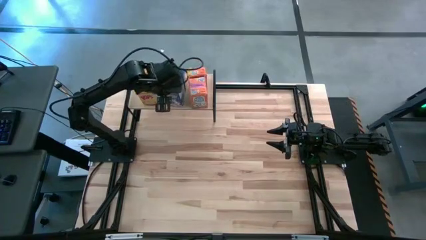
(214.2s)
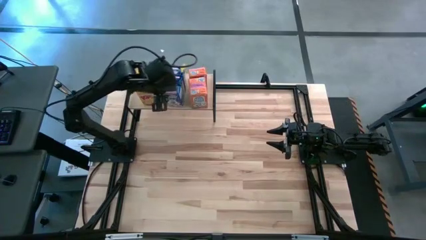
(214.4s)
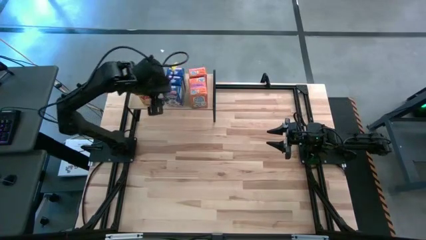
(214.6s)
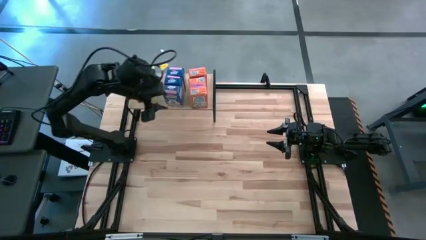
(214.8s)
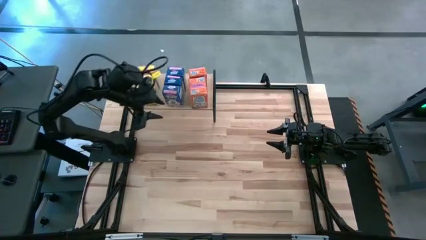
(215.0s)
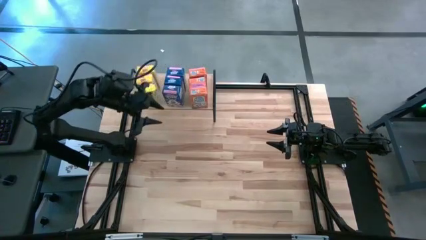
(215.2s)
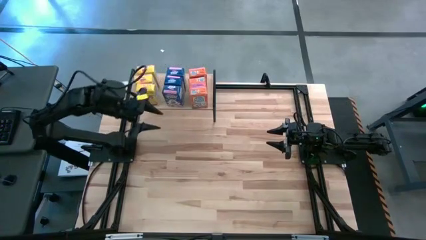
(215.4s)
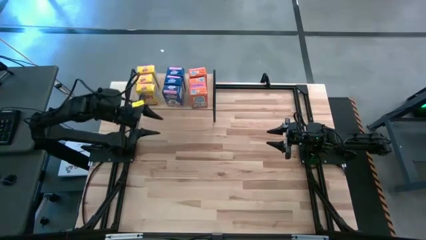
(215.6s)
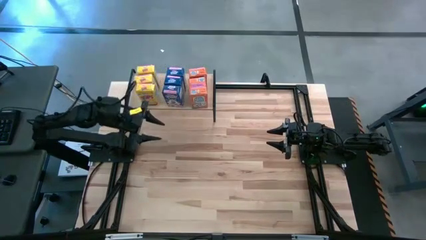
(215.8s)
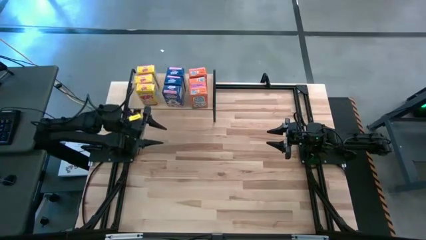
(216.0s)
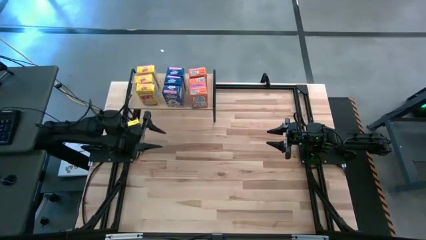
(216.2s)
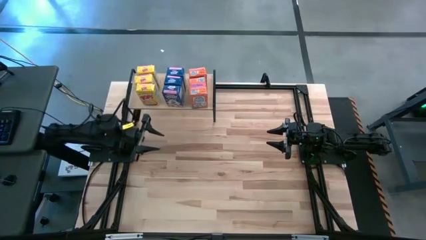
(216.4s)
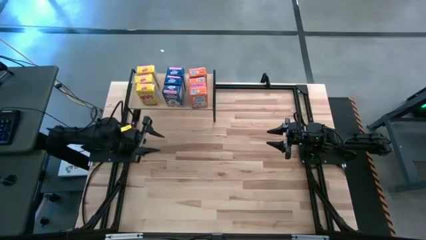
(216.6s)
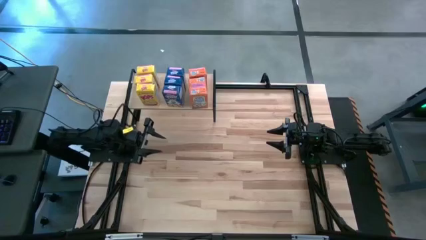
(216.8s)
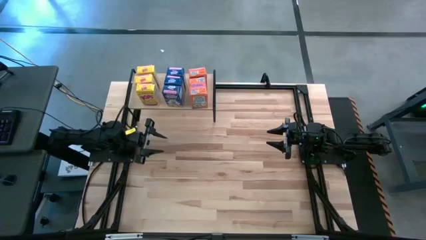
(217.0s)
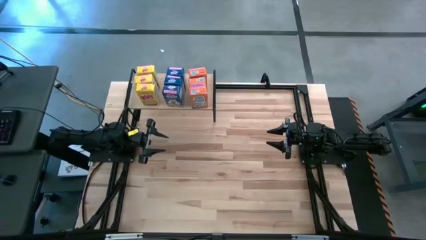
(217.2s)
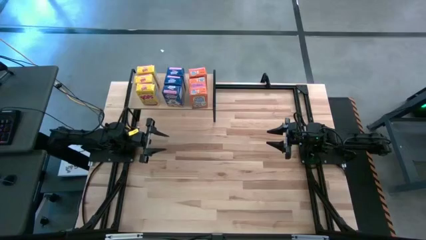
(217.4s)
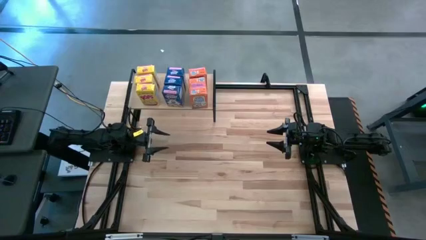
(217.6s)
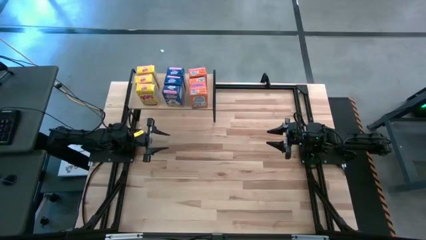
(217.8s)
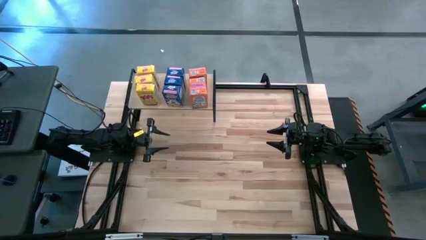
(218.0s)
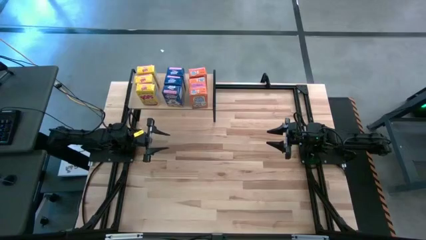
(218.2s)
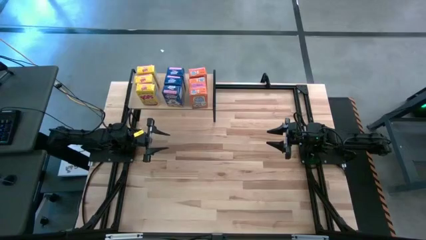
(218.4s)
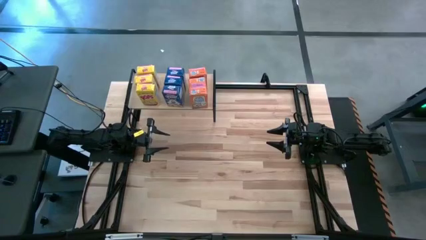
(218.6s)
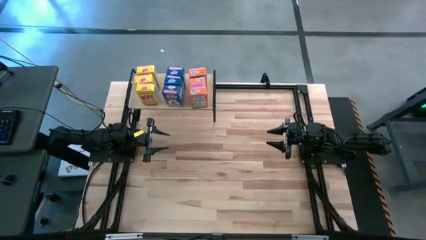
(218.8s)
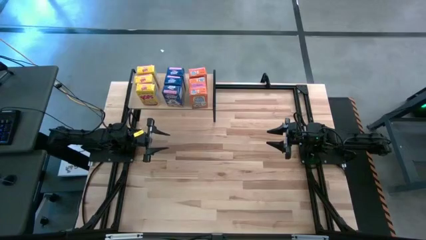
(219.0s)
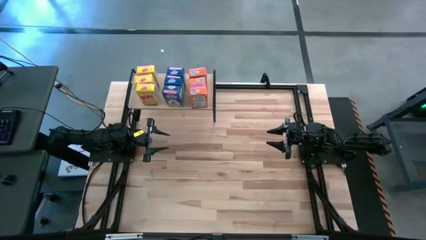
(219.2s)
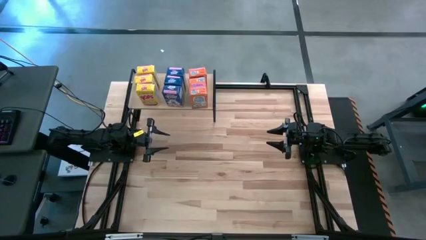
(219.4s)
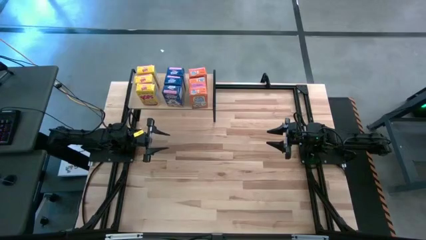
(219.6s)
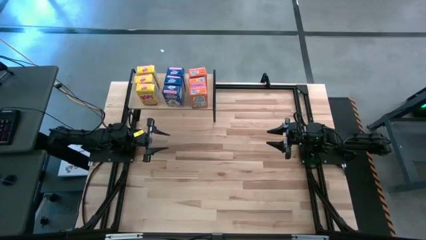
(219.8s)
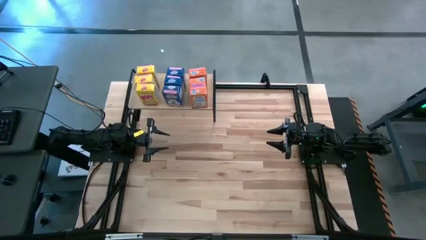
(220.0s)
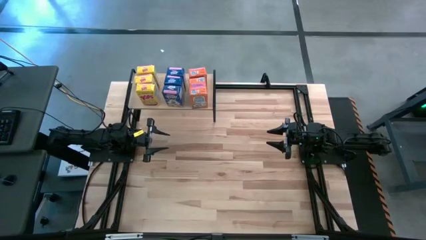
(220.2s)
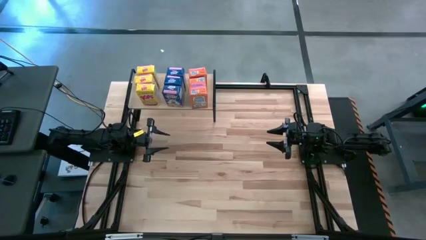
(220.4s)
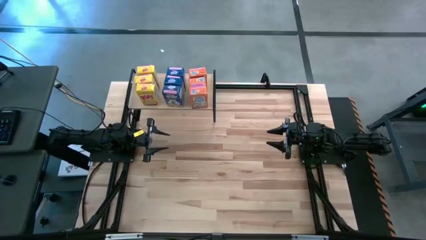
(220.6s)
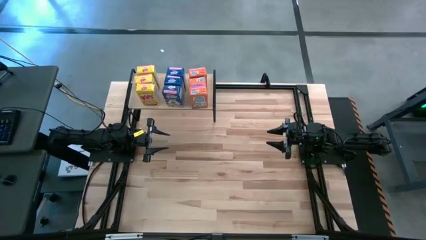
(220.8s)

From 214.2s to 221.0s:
Task: Stack cereal on shelf
Return to Home Position

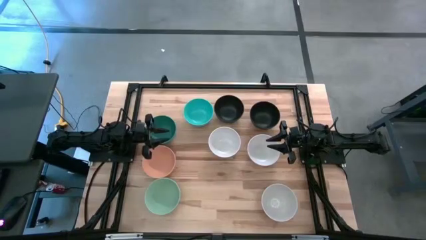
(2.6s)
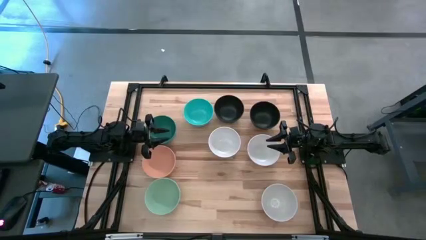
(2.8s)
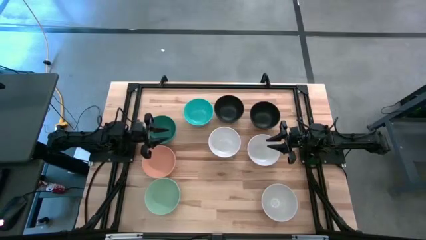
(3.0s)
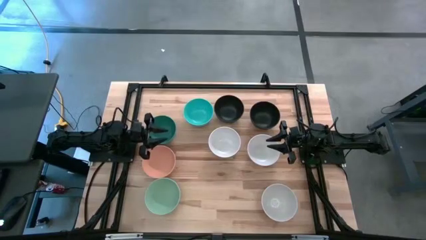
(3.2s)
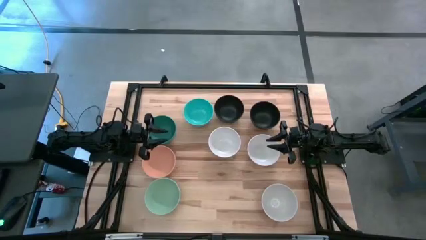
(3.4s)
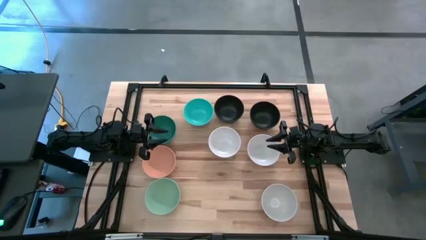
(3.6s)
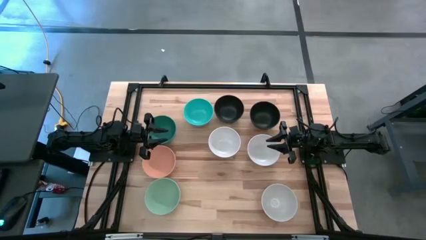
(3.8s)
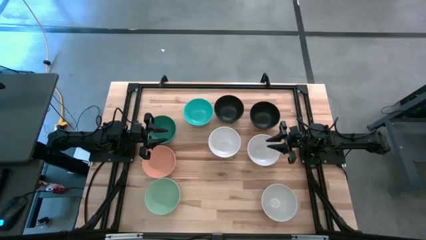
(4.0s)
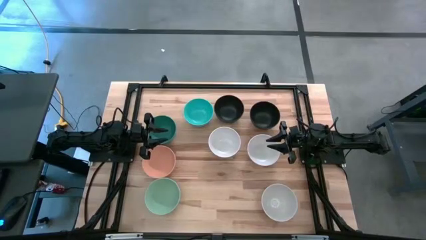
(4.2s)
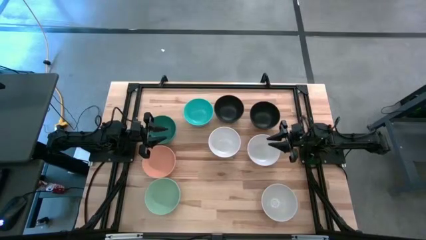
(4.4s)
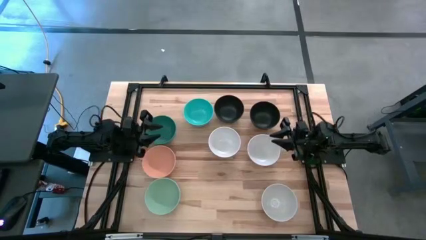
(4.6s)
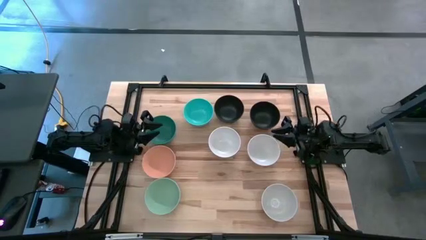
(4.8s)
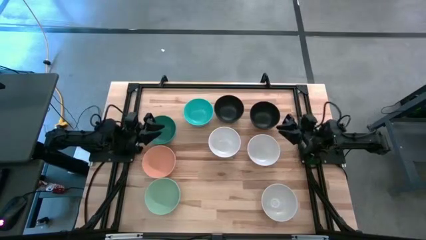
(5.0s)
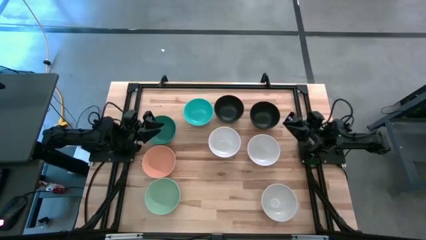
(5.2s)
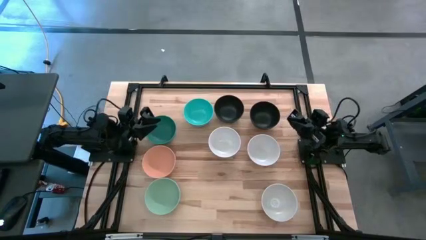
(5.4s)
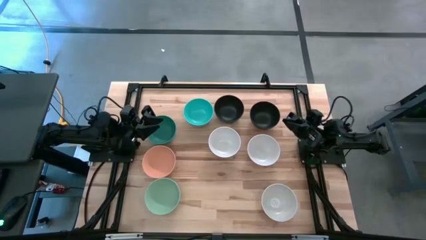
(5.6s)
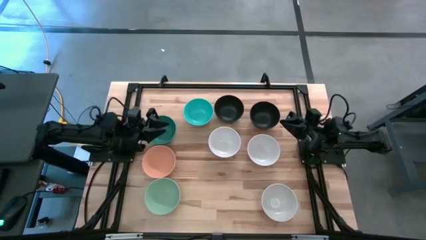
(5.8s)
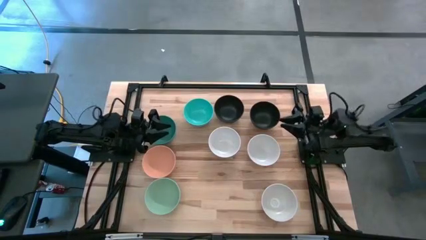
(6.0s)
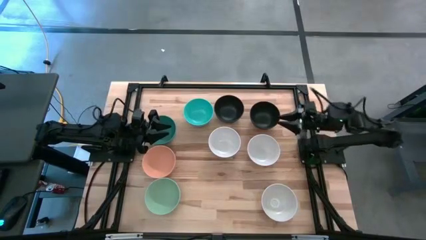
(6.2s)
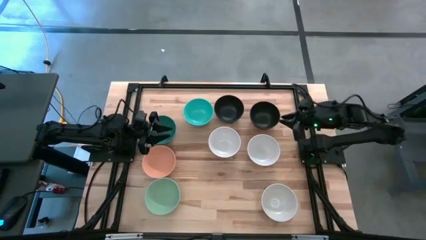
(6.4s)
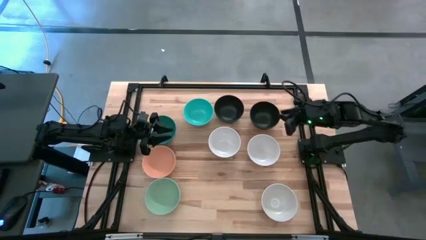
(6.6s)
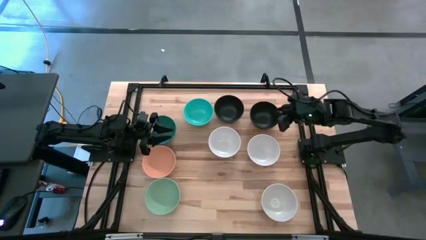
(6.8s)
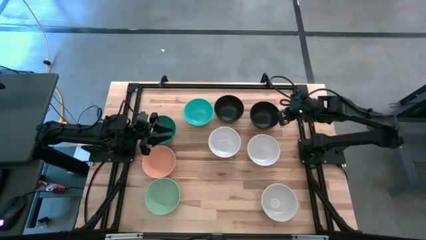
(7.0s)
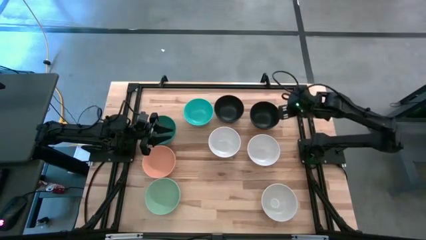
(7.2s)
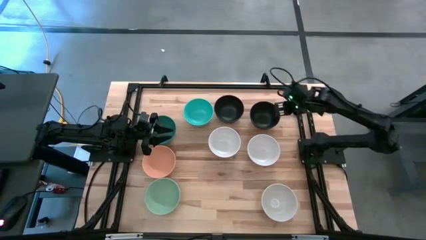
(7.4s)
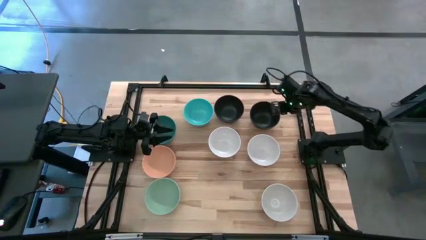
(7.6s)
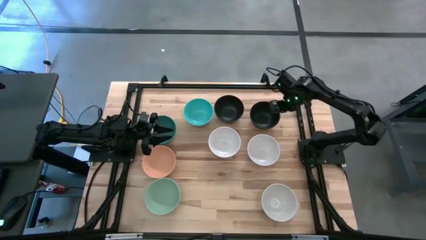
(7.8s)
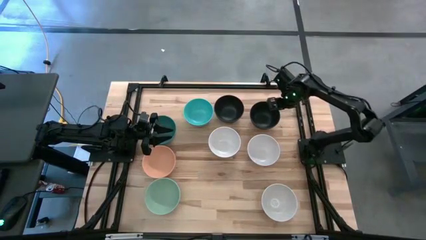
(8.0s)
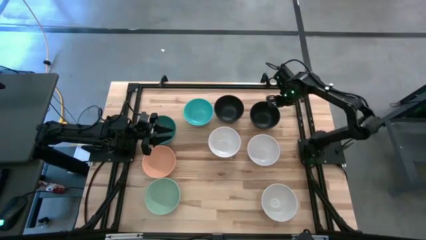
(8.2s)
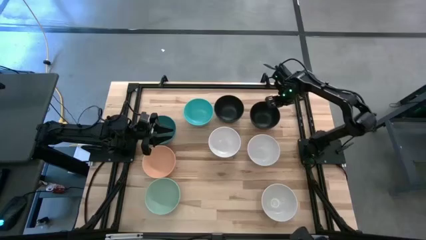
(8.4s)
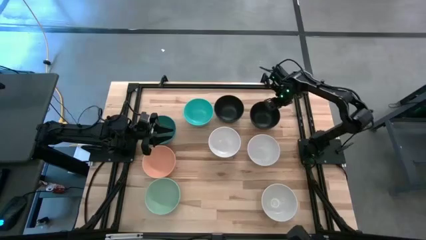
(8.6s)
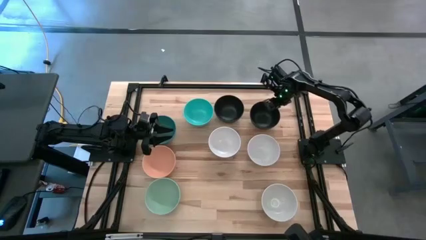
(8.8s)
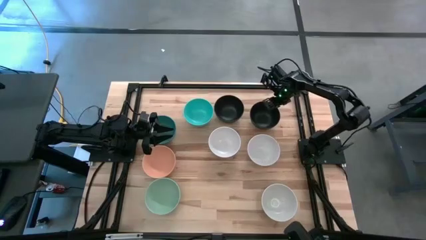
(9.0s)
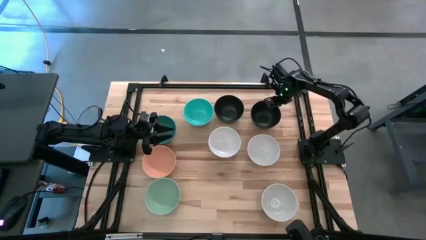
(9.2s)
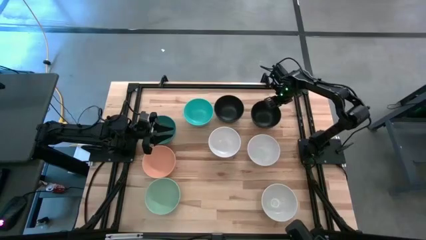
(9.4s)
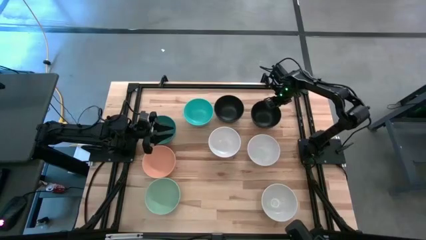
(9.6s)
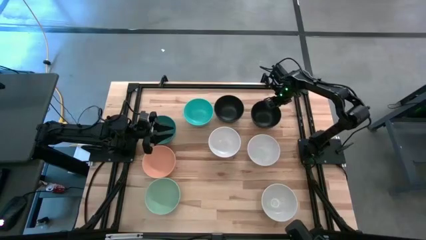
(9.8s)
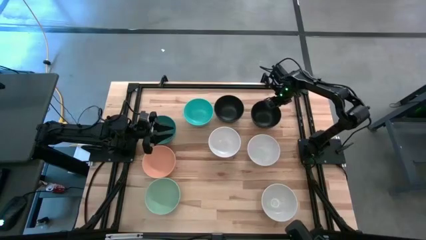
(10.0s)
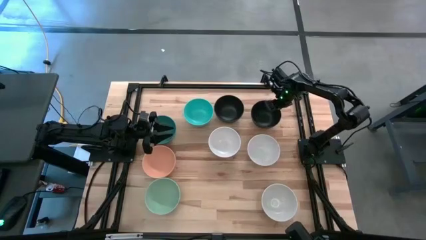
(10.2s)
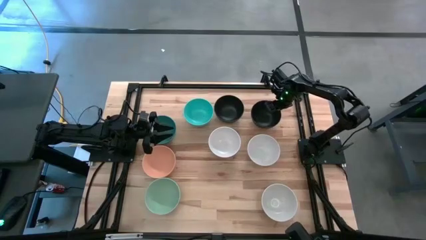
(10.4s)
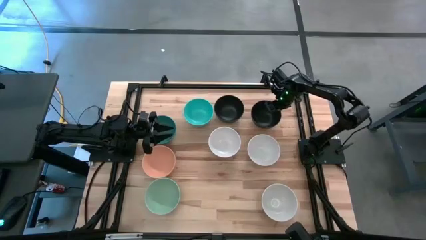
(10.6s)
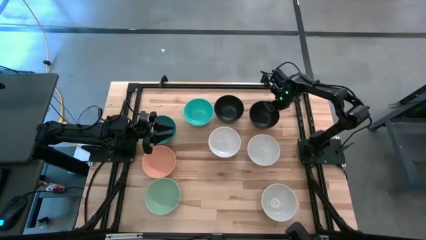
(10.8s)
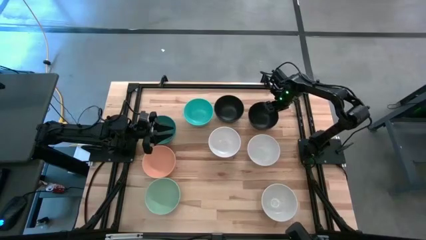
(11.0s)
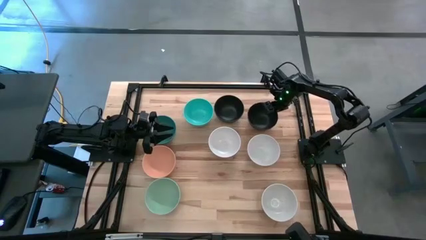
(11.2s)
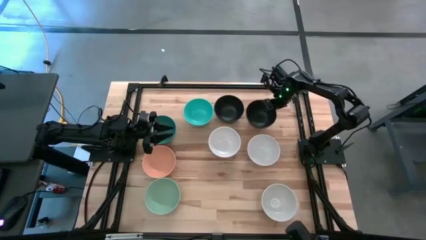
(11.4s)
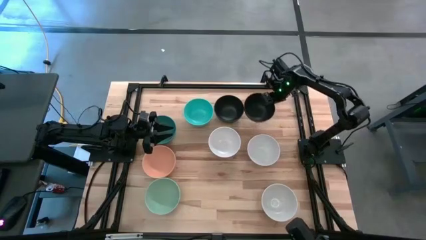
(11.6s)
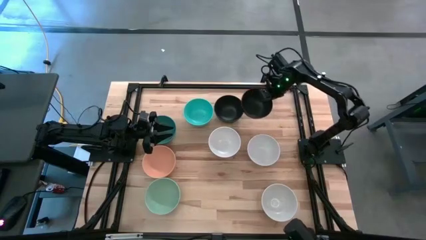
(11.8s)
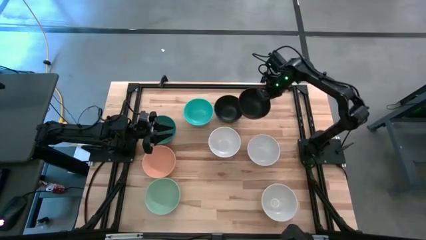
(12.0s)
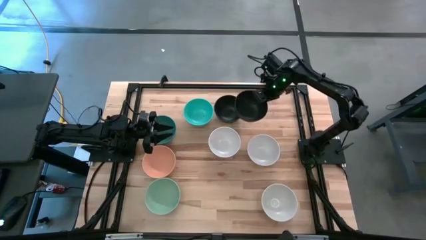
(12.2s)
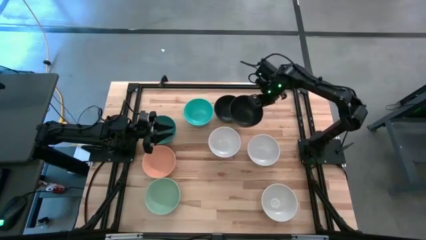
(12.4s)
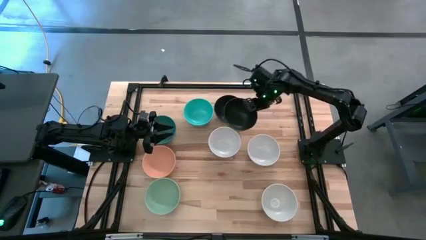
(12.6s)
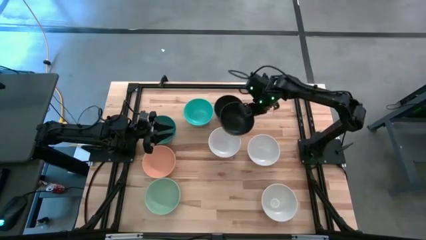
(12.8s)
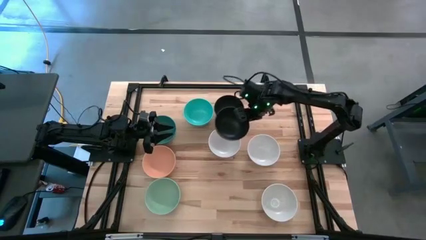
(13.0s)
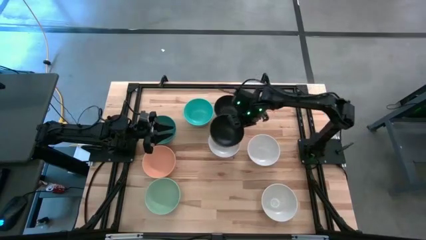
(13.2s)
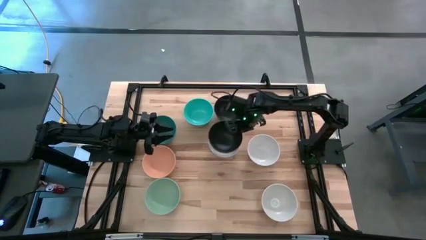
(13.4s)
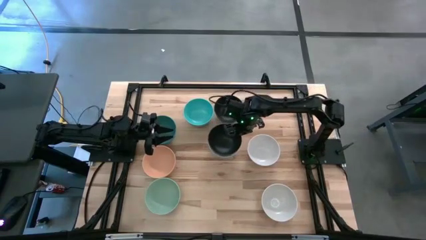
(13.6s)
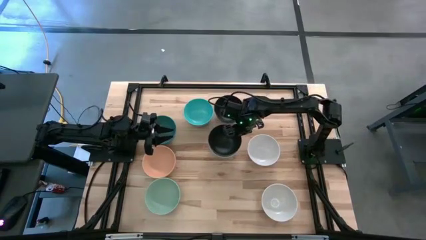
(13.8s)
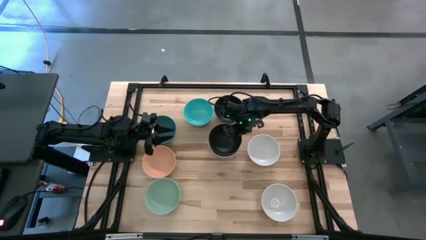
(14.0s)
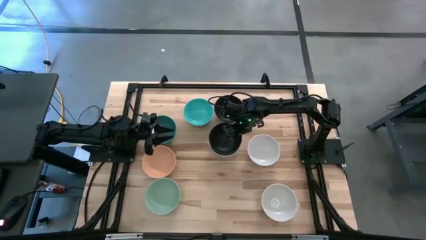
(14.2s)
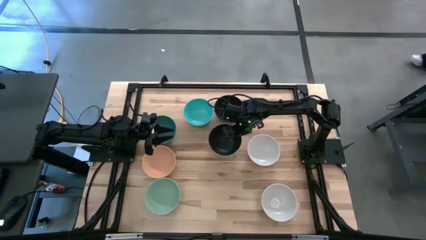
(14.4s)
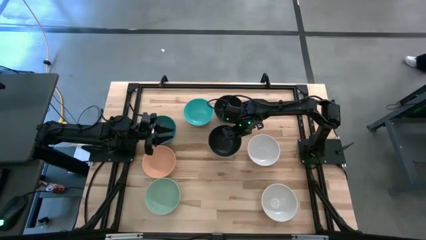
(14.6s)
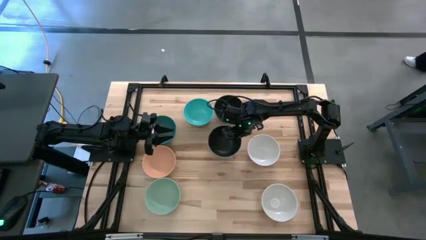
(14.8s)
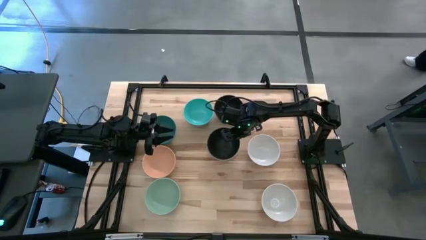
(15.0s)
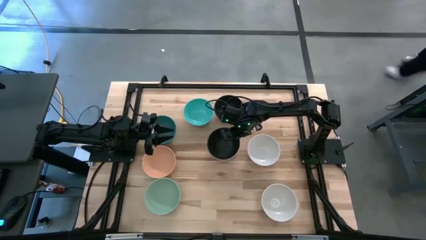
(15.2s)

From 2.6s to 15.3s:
Task: Nest bowls inside each other
Stack the right black bowl on top of the left white bowl
